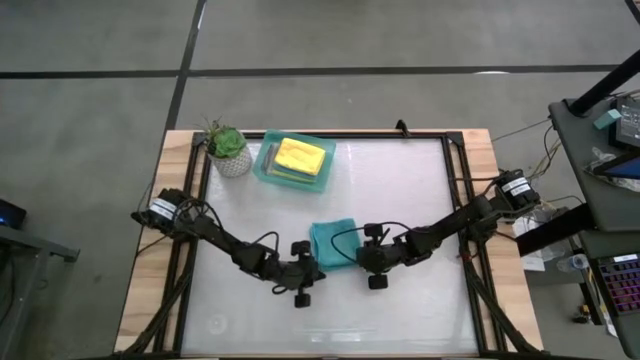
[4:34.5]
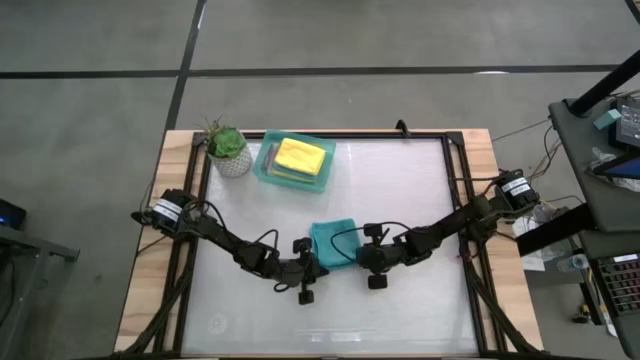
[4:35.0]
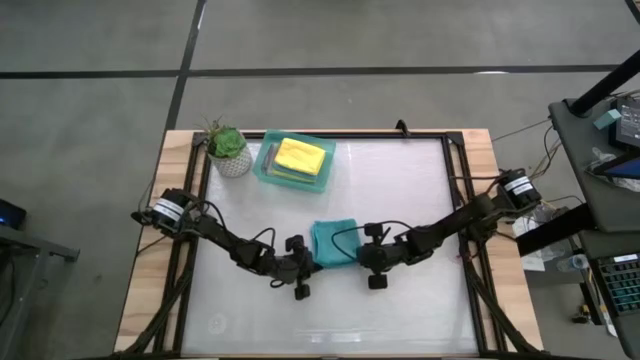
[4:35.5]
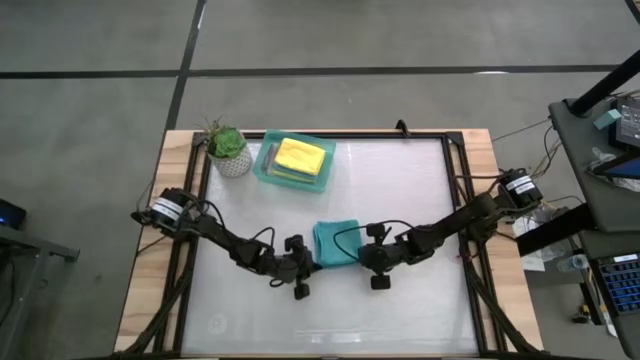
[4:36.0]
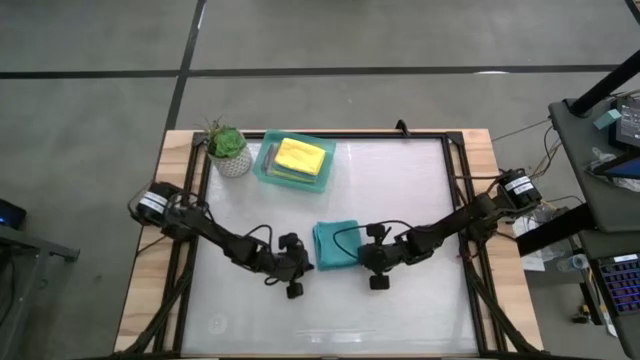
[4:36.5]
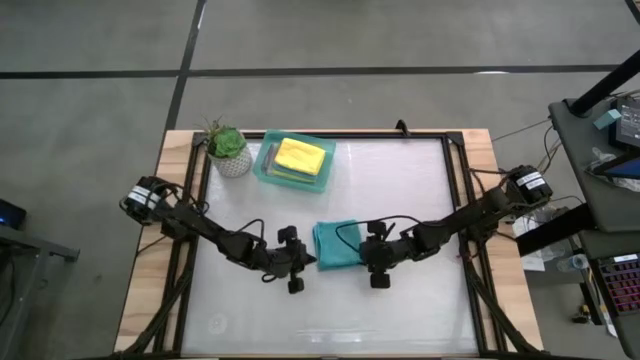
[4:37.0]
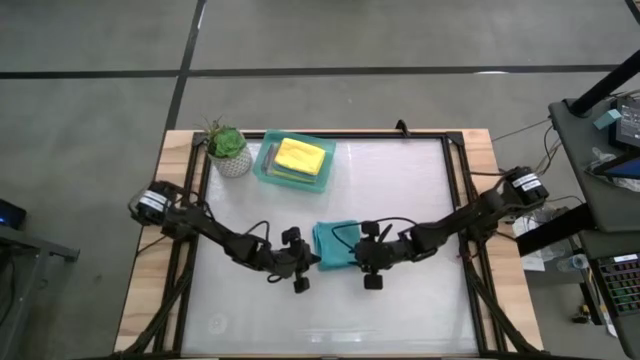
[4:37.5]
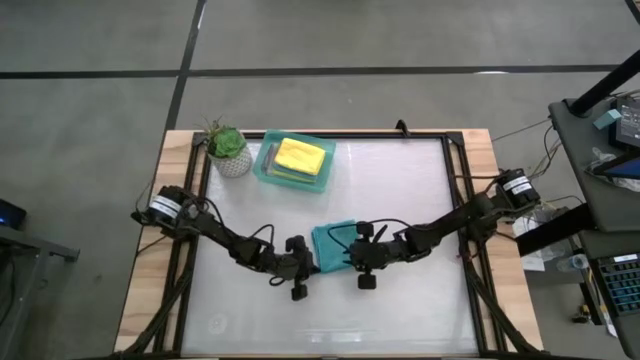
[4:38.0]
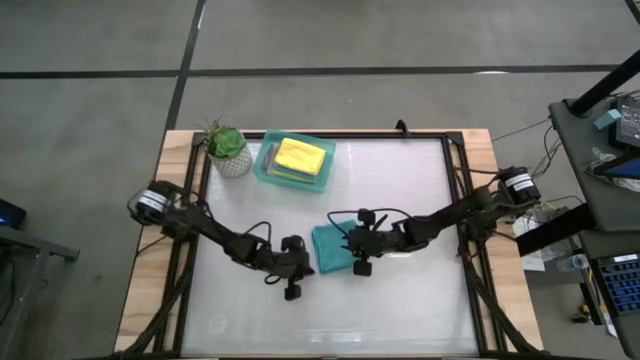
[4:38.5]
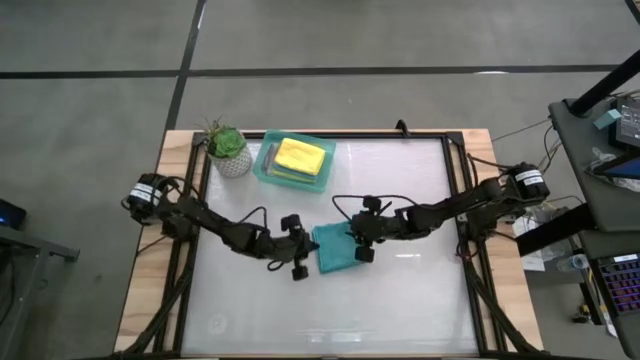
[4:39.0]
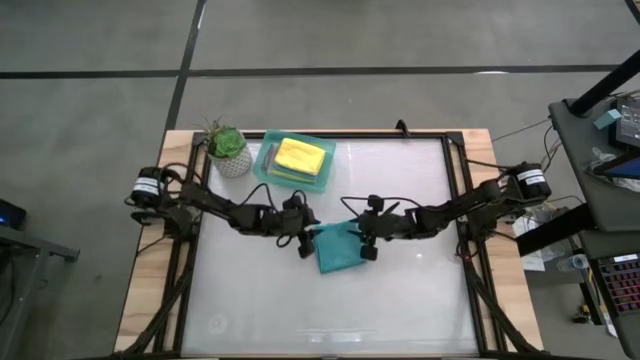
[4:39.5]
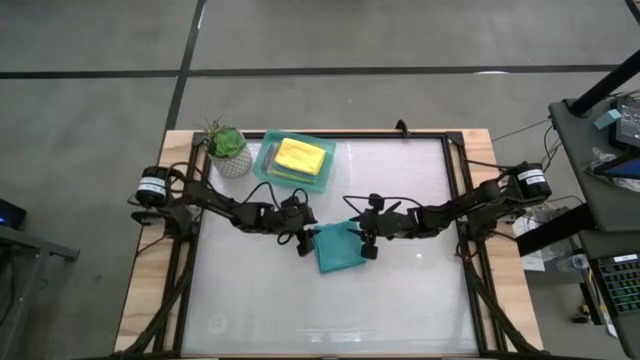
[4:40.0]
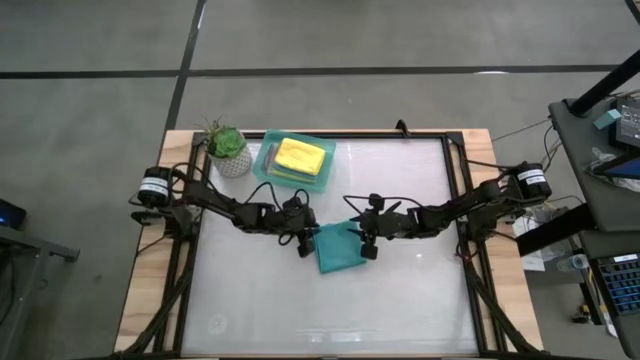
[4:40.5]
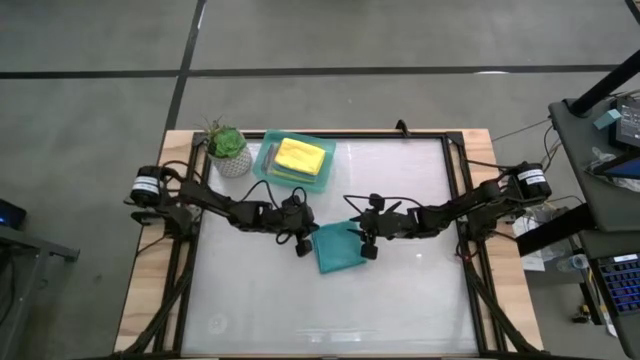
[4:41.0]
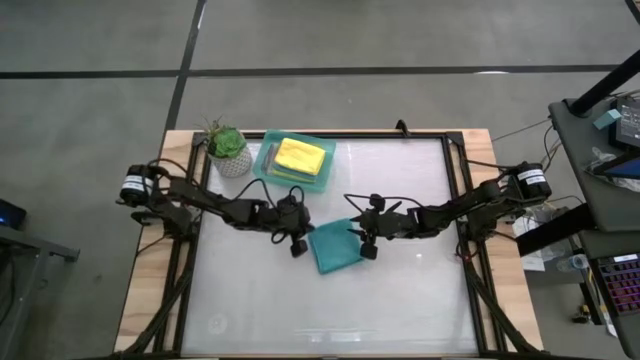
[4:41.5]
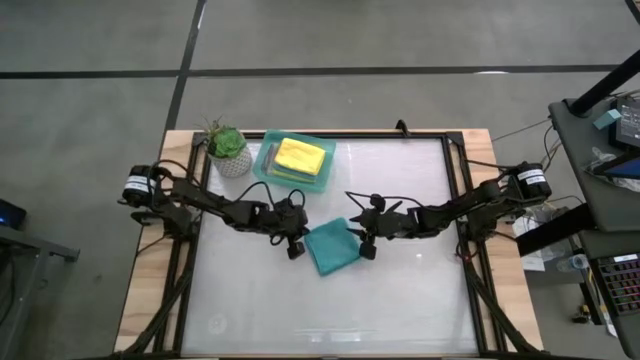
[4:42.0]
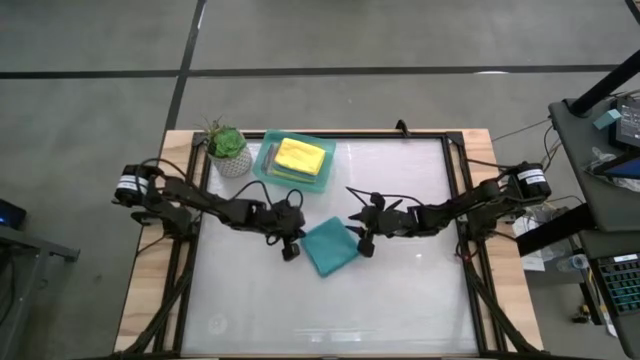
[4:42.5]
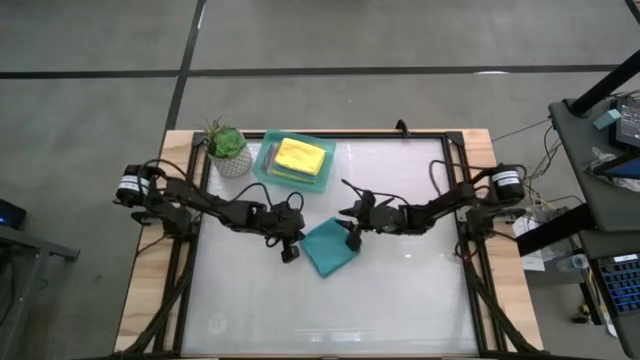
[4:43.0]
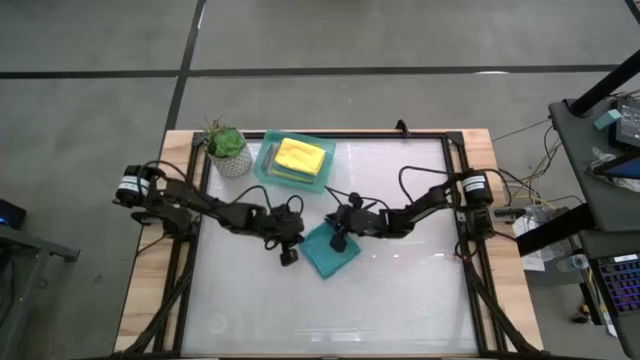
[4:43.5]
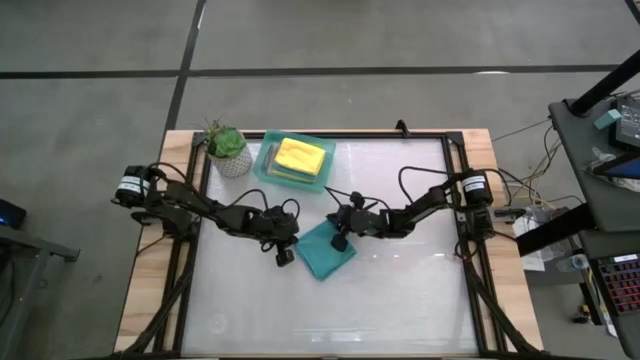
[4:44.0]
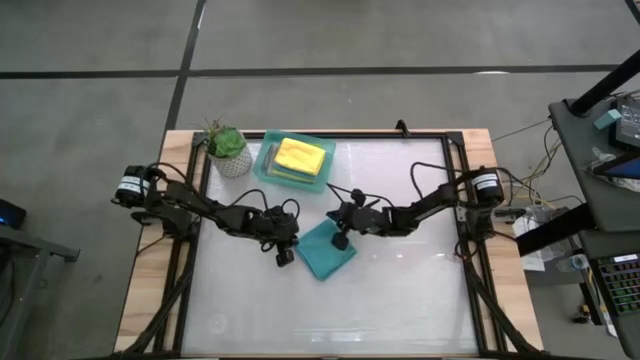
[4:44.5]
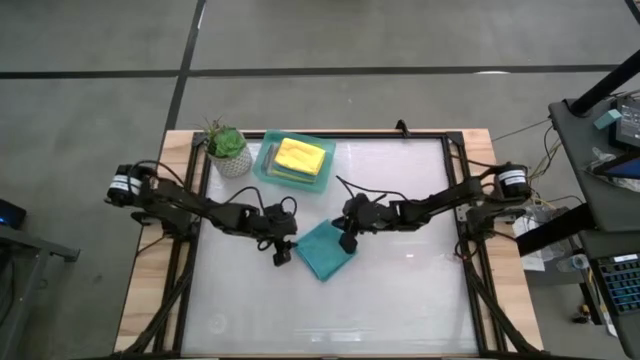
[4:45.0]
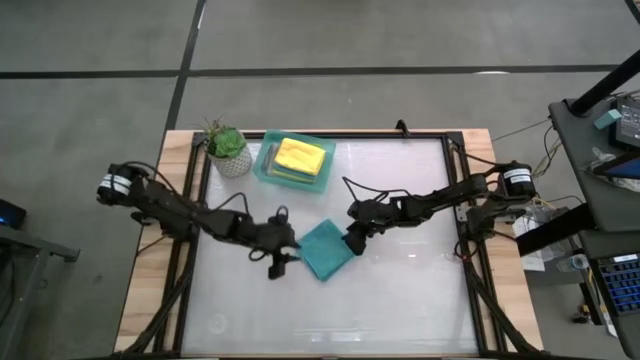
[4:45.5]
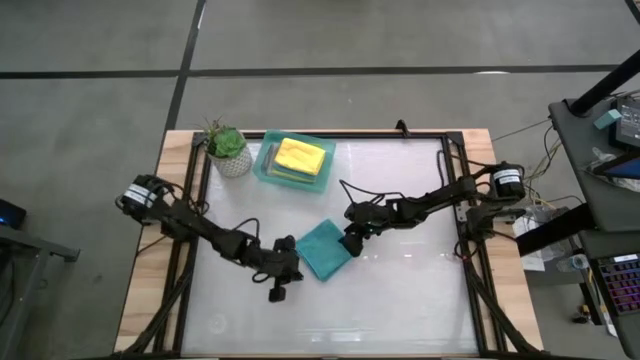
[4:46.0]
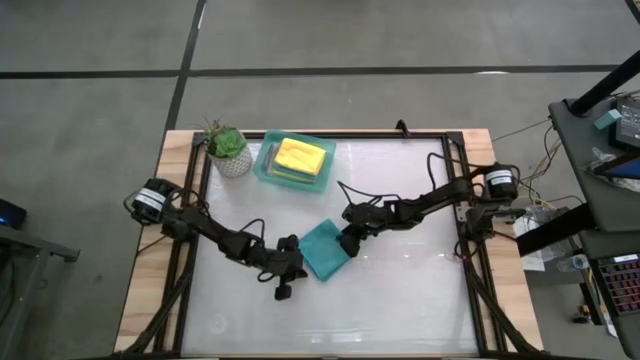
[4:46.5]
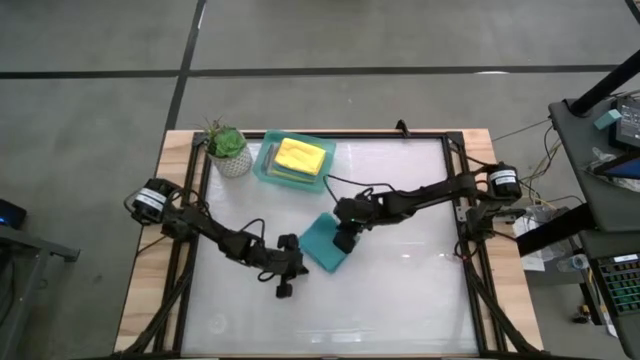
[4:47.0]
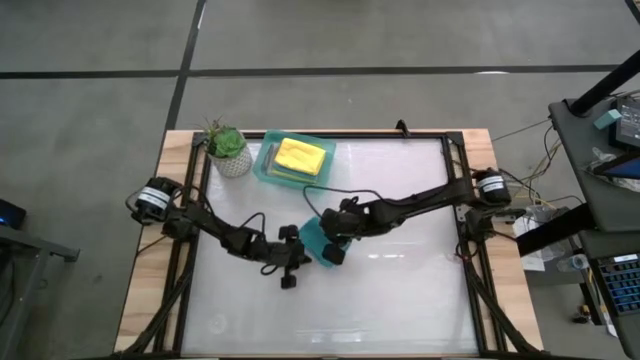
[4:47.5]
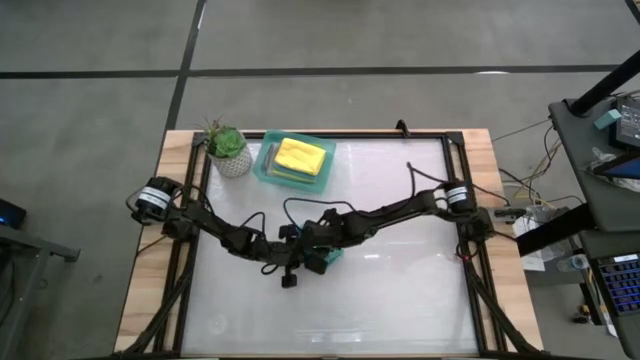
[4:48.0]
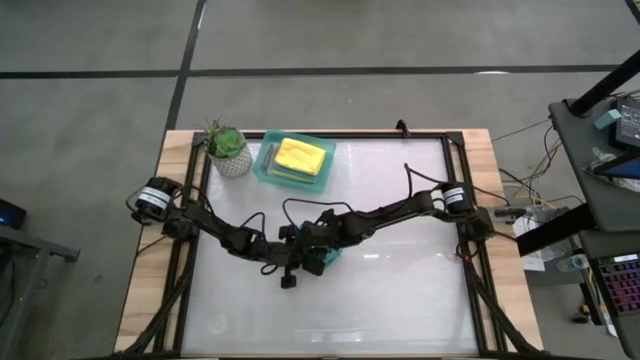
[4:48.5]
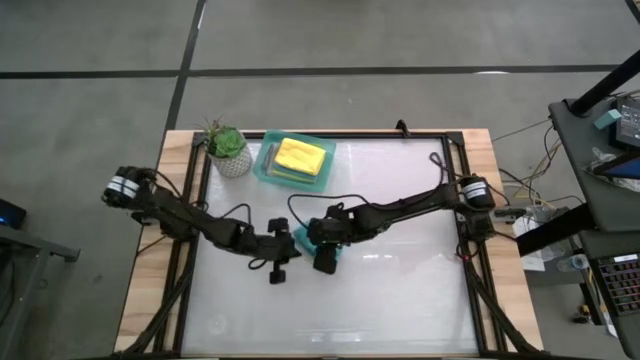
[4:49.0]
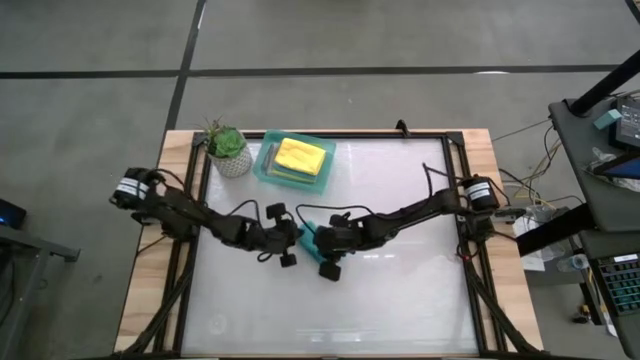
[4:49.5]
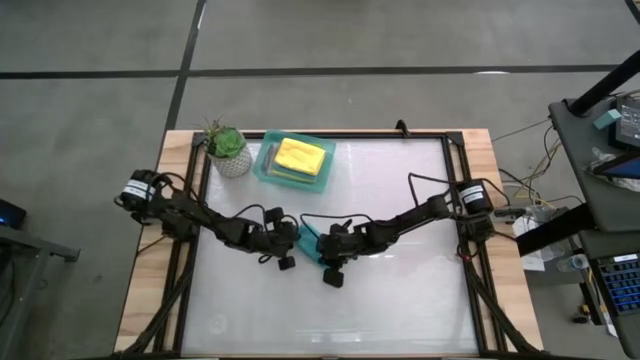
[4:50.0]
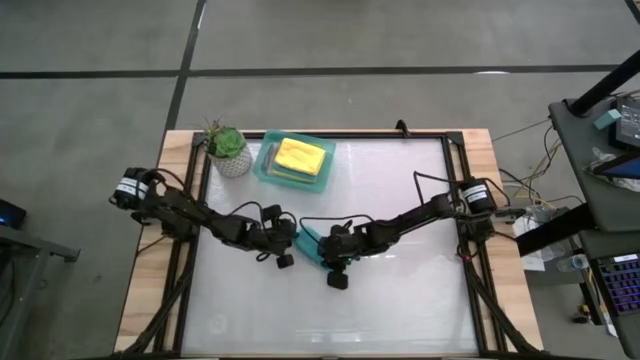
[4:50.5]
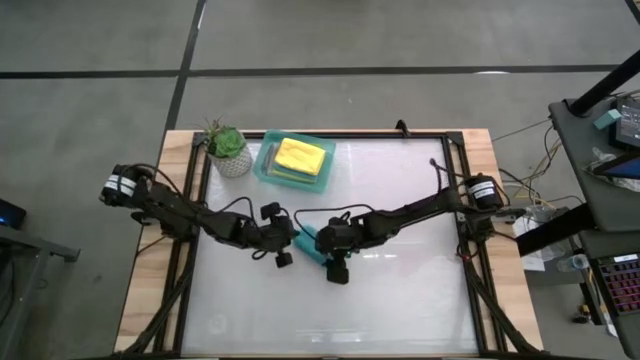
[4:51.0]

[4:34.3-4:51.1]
Task: Fold microfiber towels
Fold the blue microfiber towel

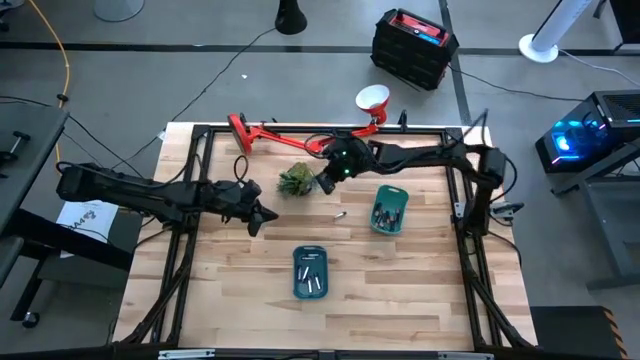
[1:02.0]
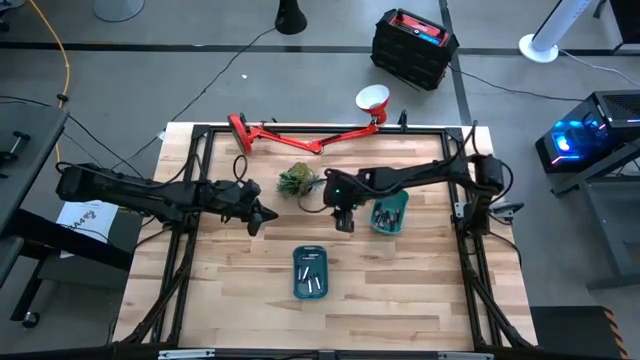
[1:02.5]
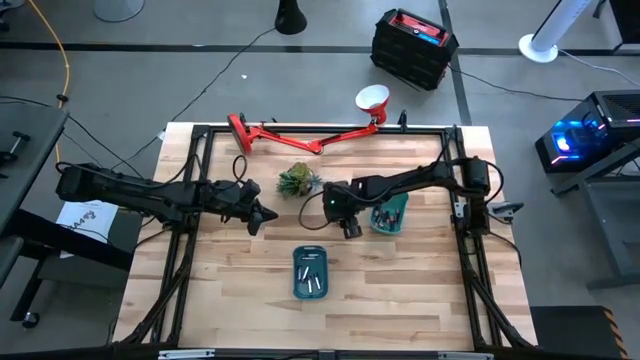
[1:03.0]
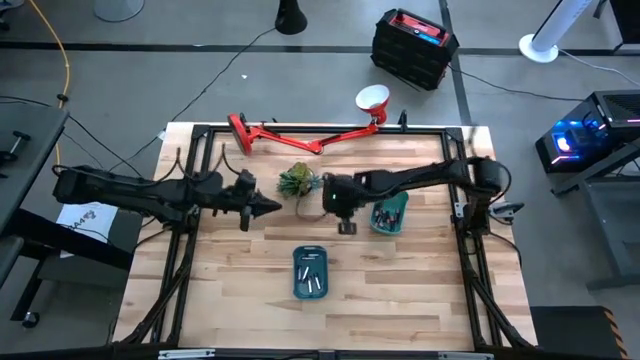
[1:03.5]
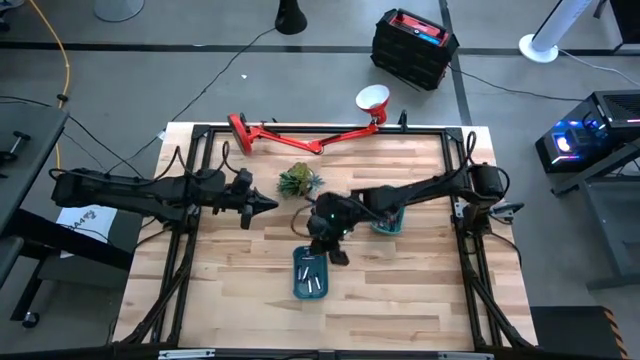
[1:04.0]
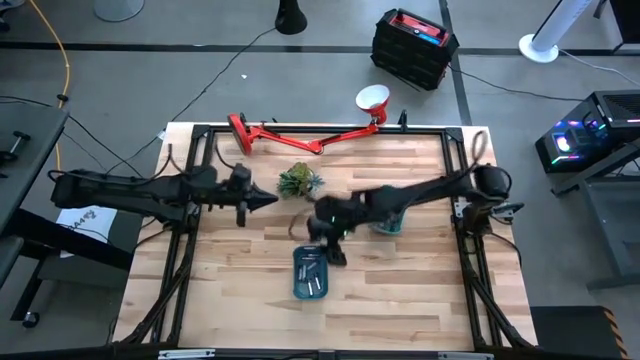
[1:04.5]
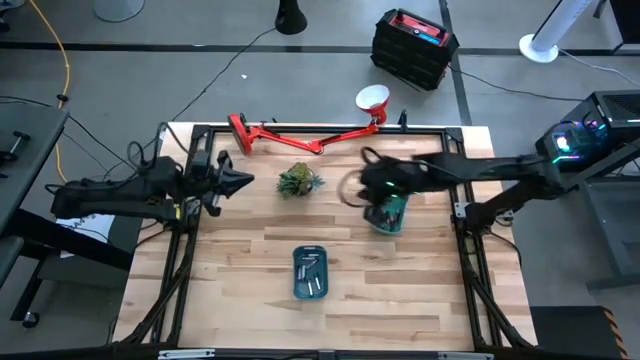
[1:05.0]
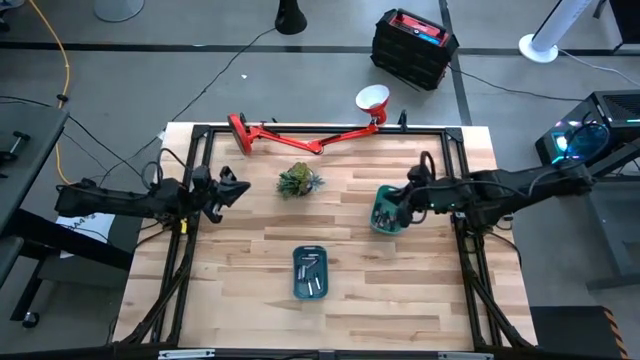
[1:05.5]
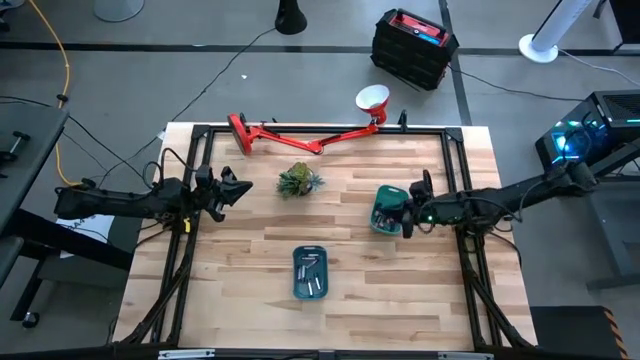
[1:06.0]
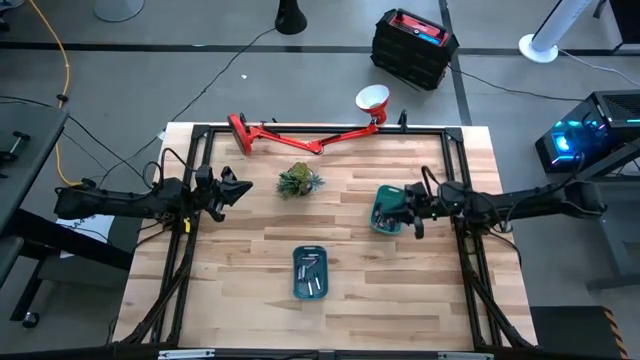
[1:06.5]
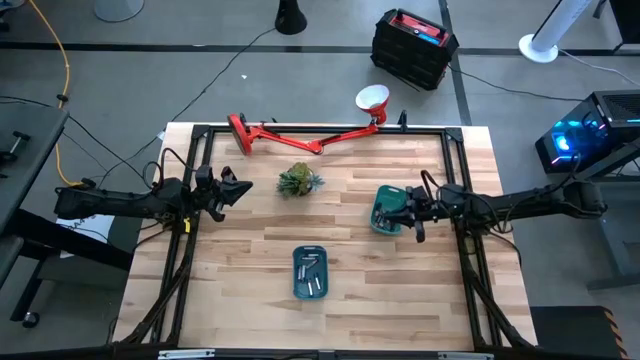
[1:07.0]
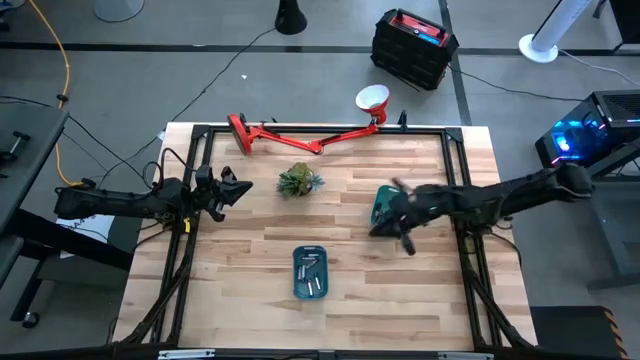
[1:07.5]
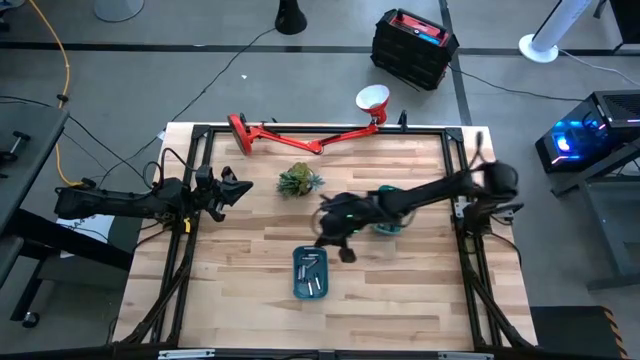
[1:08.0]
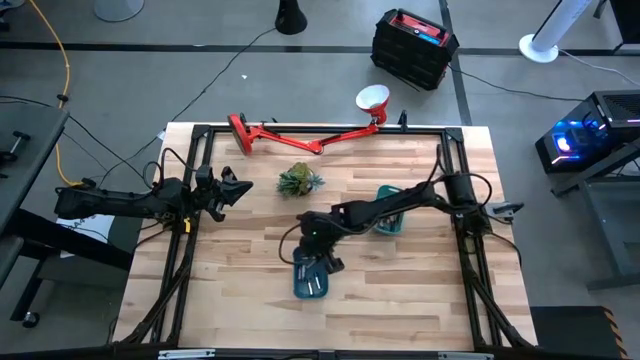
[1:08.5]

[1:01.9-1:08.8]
Task: Sort batteries
Put the silver battery into the blue bin
